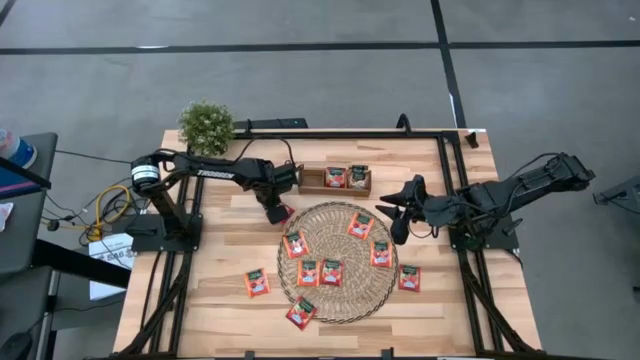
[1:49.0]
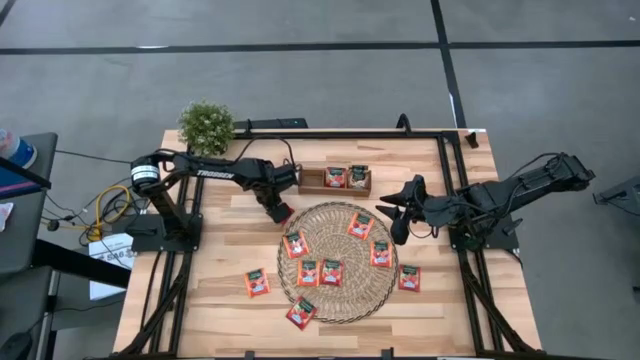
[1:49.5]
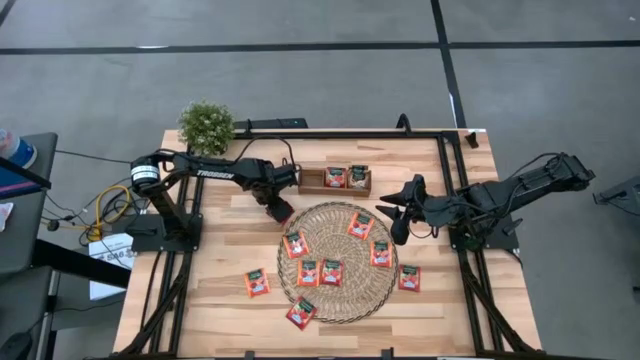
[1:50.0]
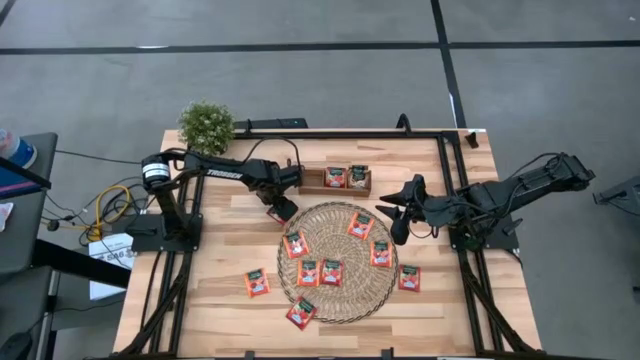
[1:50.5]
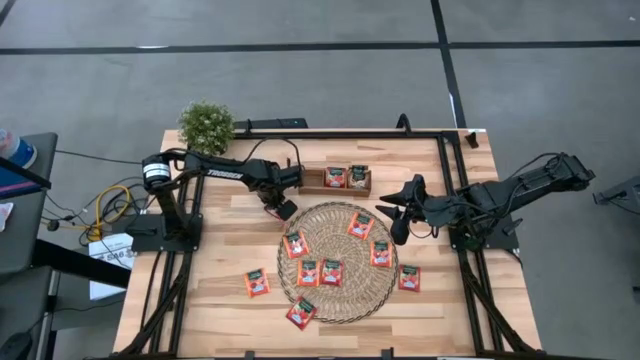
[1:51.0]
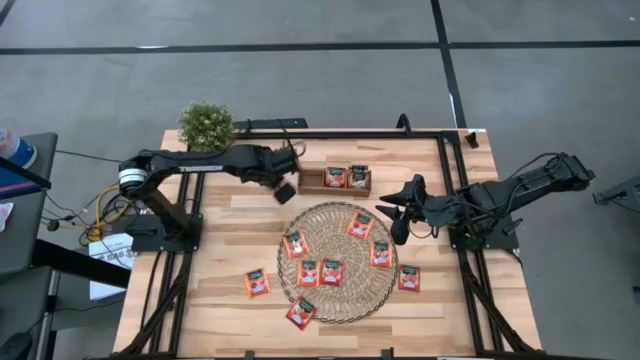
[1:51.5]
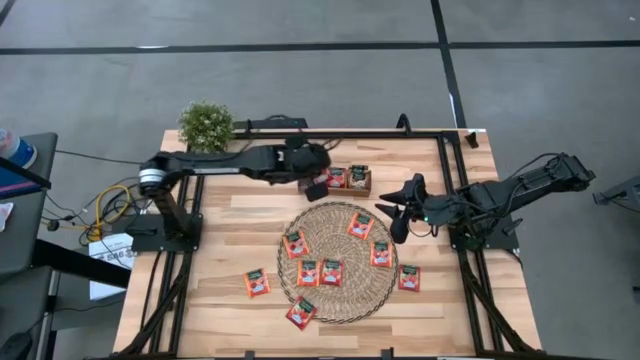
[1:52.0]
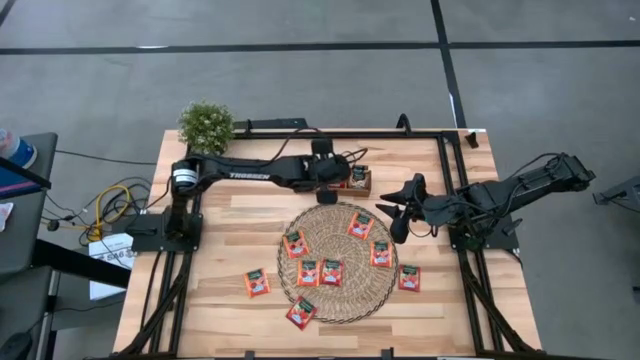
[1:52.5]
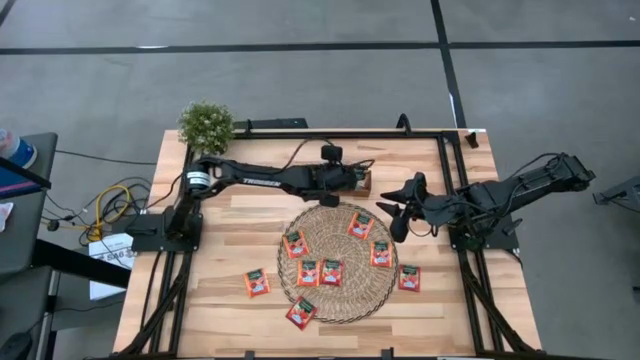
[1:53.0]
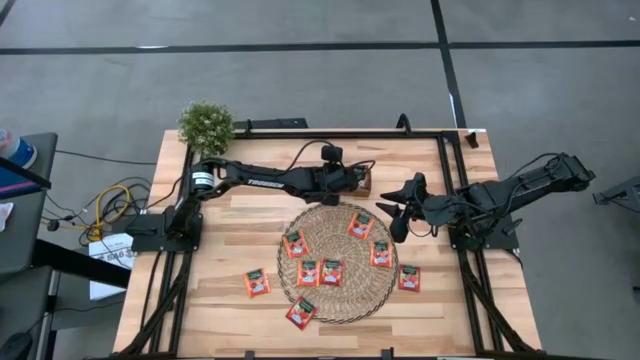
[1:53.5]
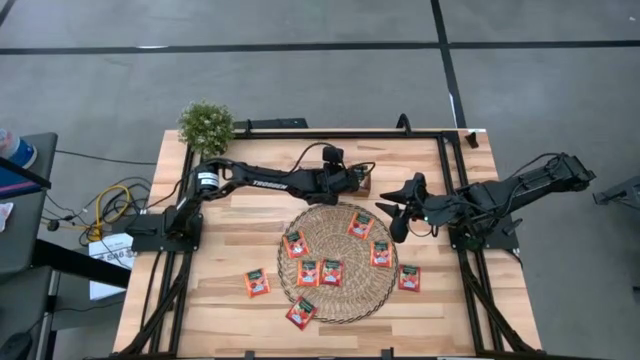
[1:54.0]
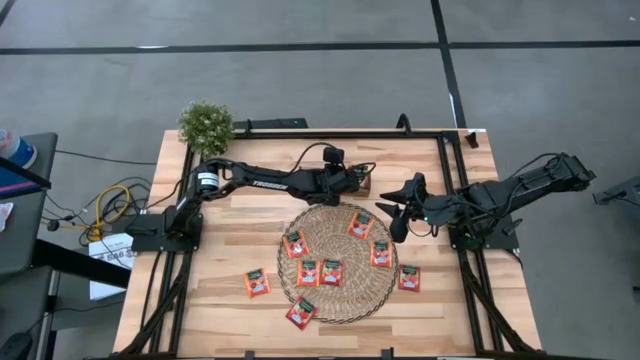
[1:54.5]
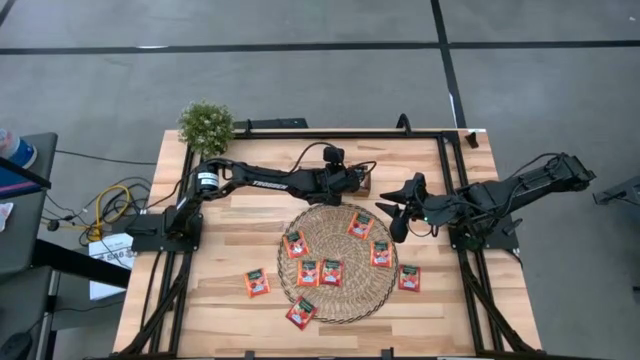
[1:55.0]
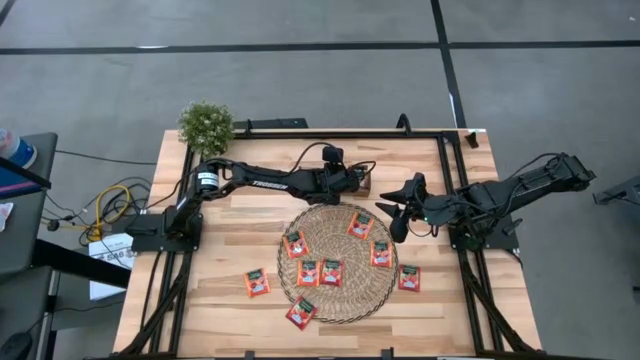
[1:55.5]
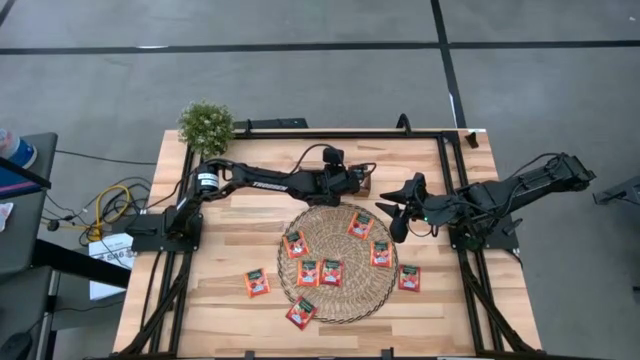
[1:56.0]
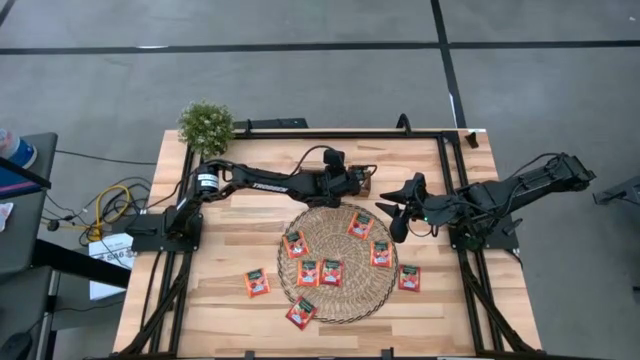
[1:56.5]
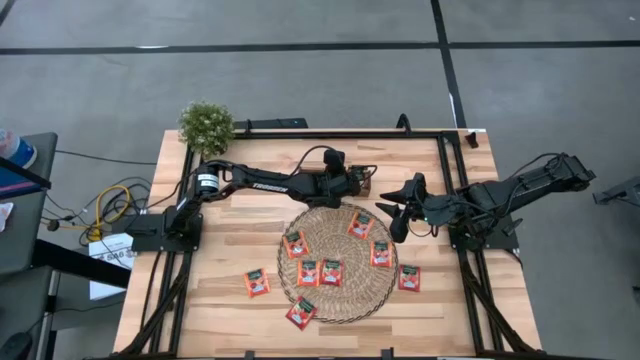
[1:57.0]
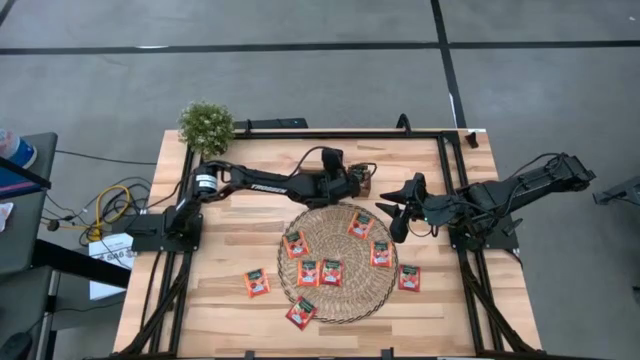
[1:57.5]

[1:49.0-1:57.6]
Task: Pick & Place Tea
Put the red tea bag into the middle section of the wooden organizer

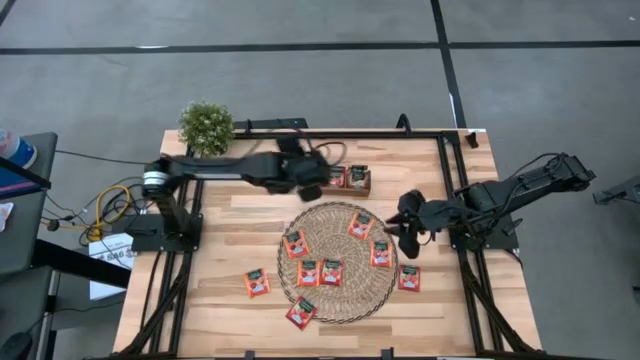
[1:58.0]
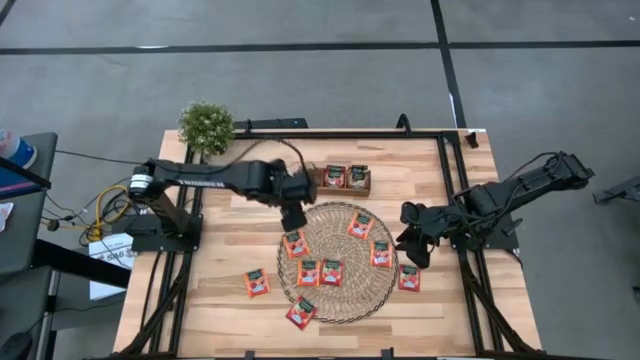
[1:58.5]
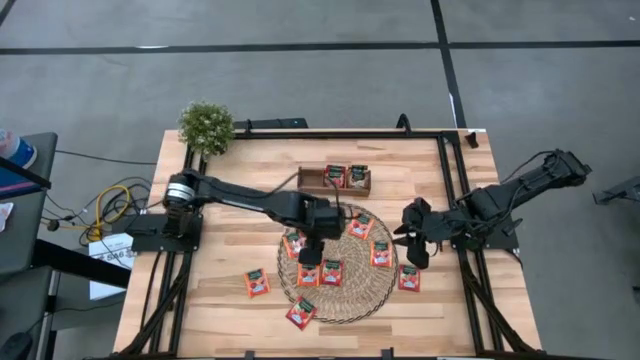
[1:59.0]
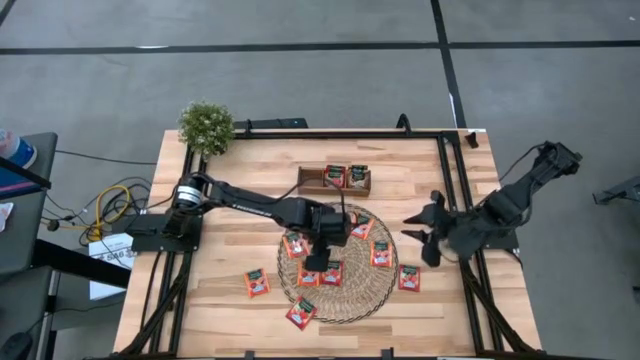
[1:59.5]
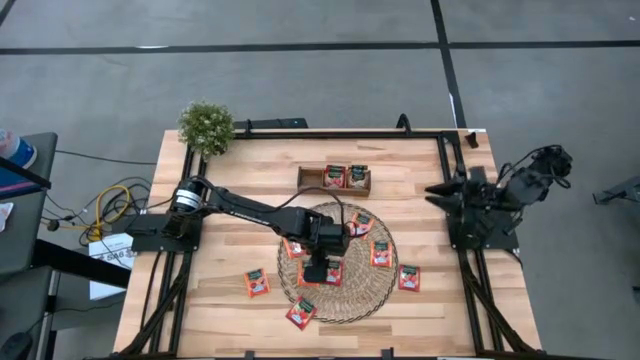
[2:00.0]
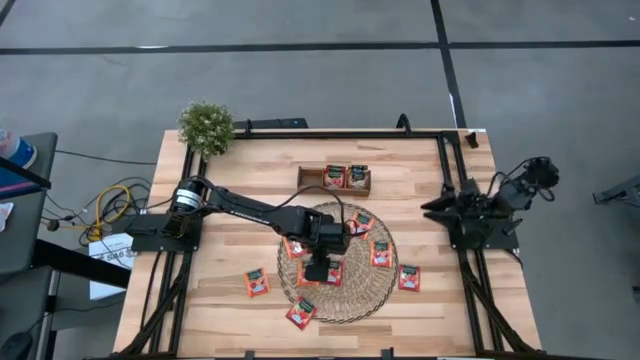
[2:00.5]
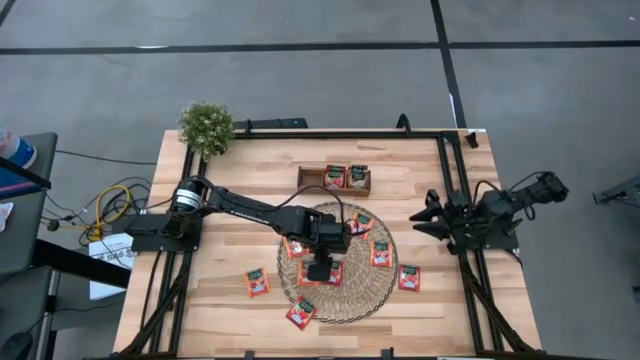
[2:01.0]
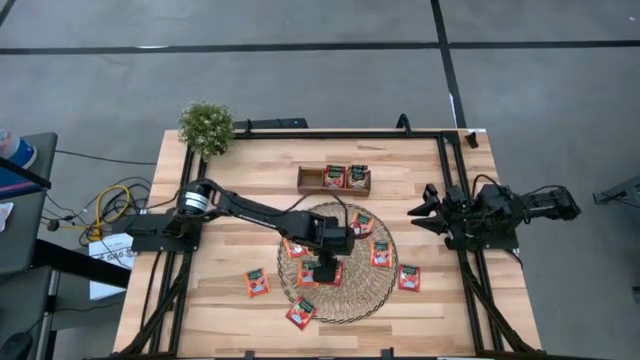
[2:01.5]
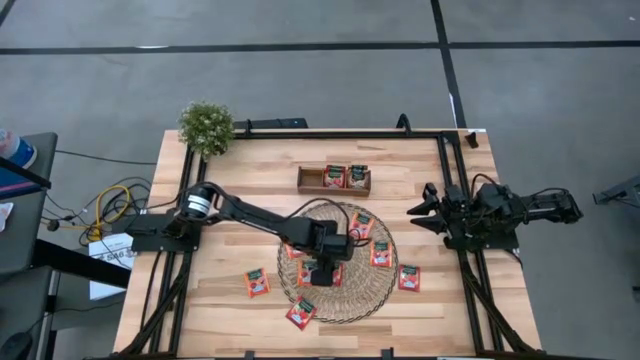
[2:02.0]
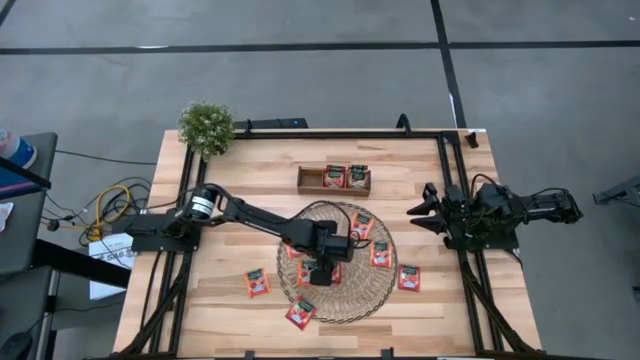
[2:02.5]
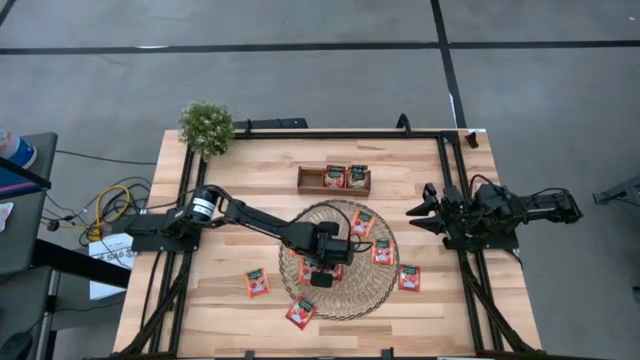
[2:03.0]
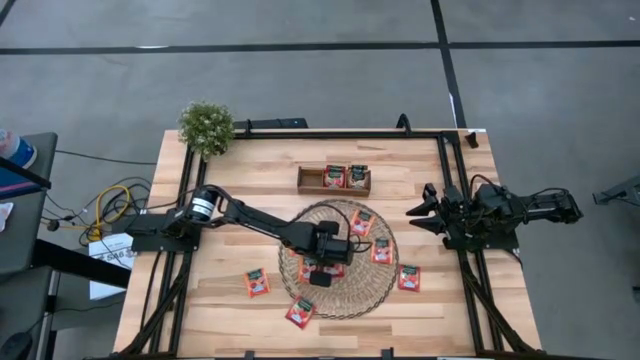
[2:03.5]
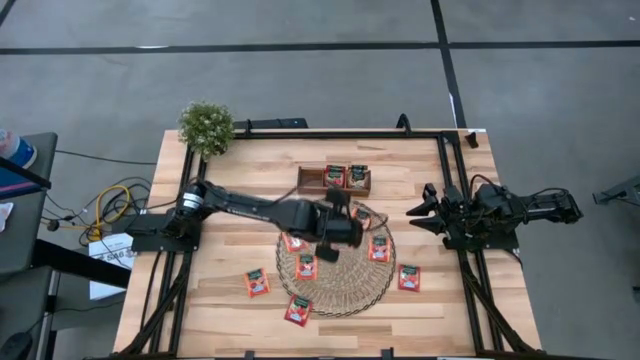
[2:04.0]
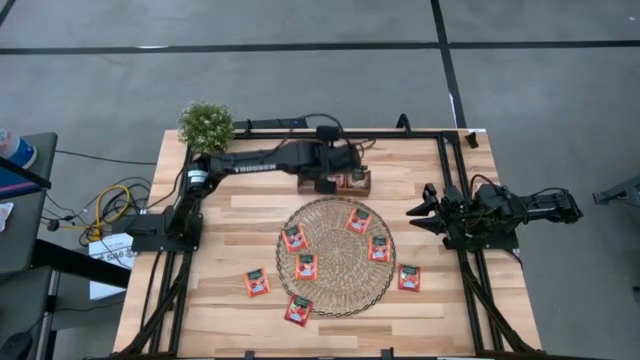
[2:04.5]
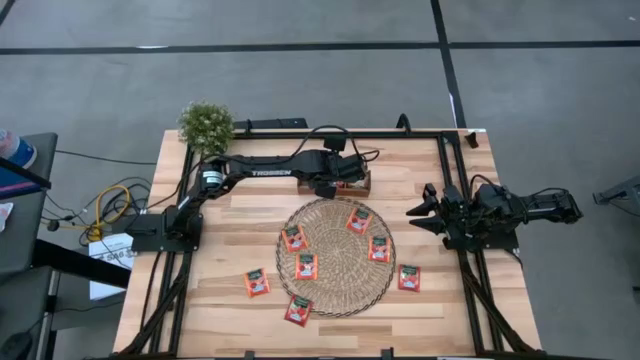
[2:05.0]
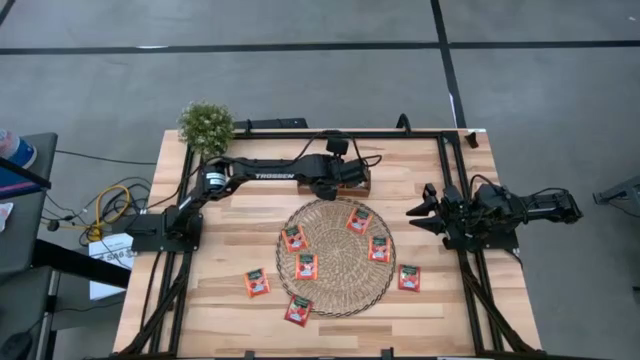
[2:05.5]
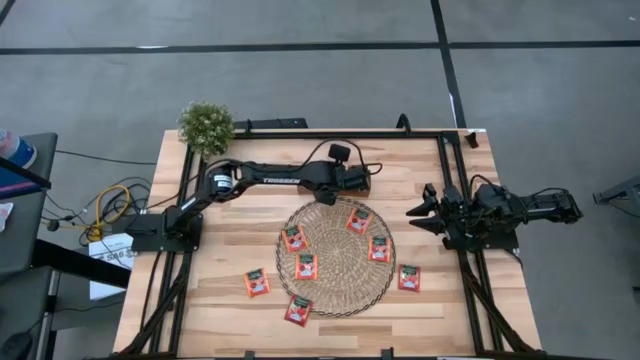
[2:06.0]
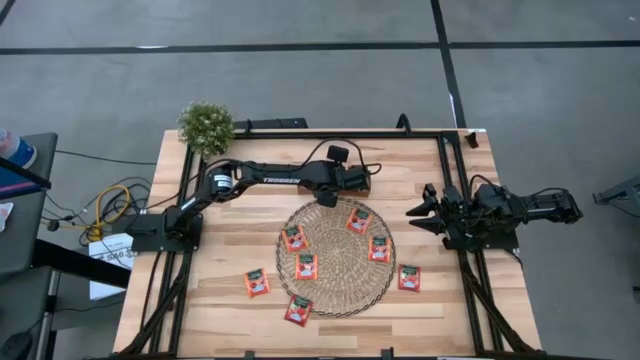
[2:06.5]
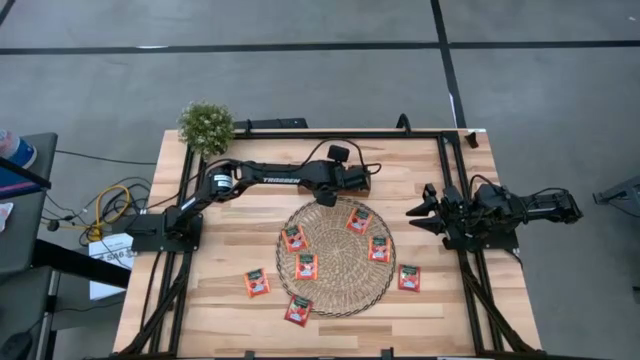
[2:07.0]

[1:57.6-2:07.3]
Put the red tea bag into the middle section of the wooden organizer

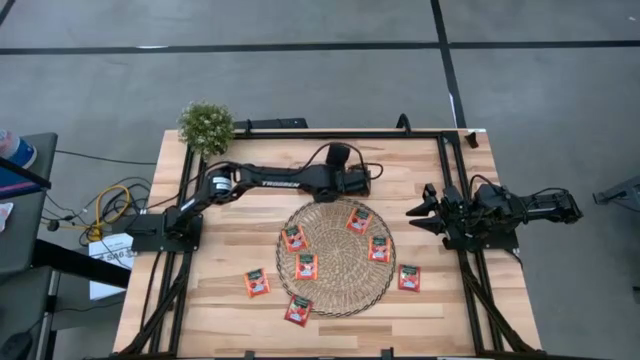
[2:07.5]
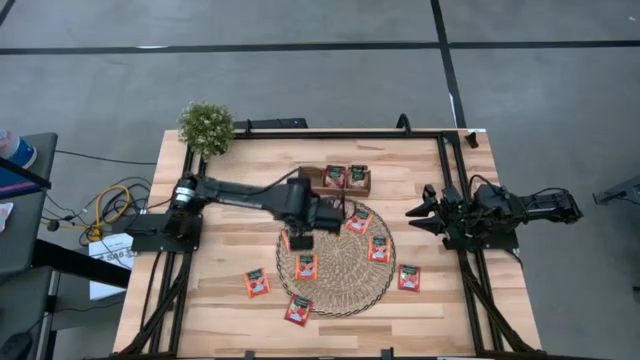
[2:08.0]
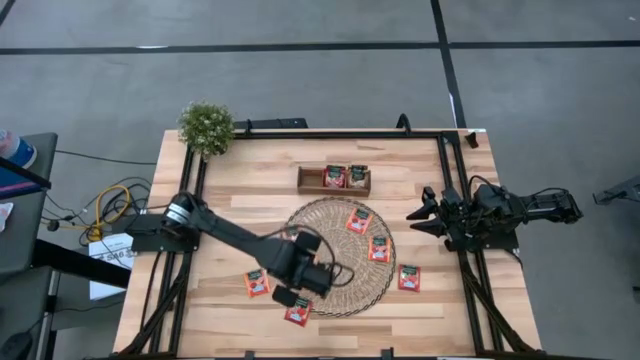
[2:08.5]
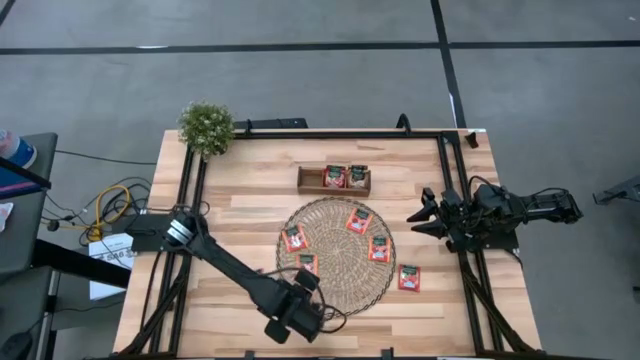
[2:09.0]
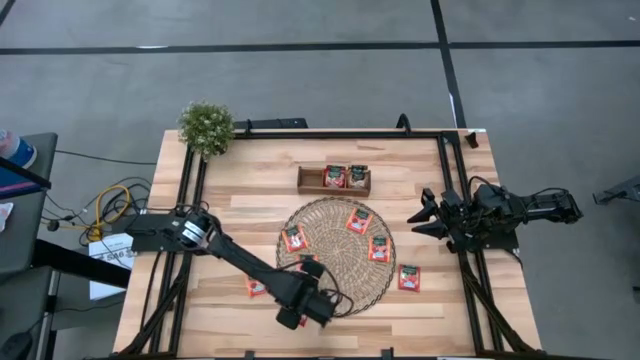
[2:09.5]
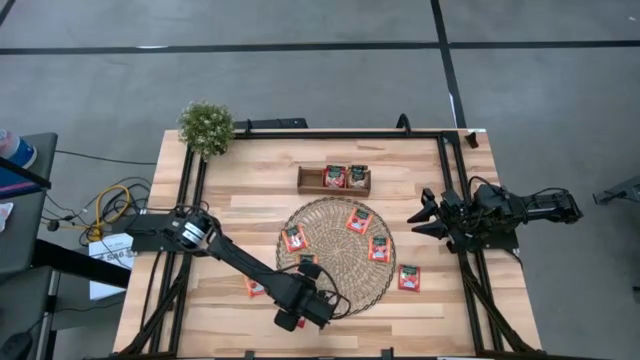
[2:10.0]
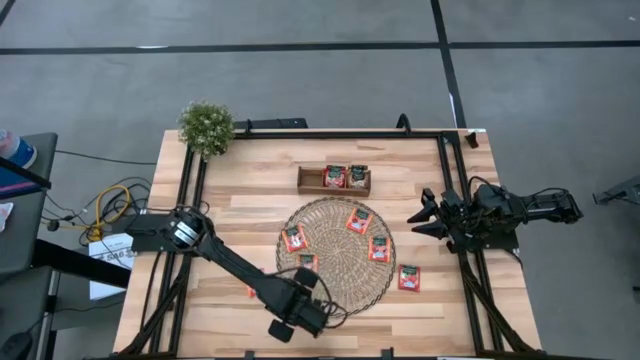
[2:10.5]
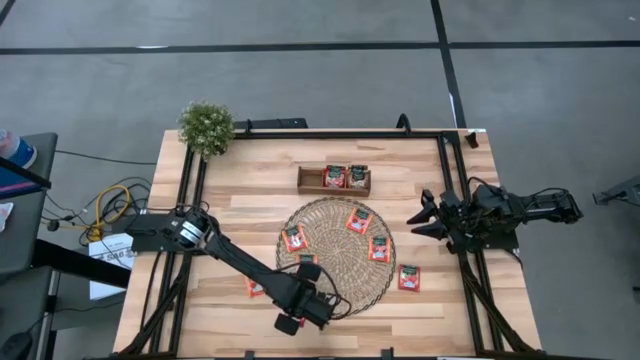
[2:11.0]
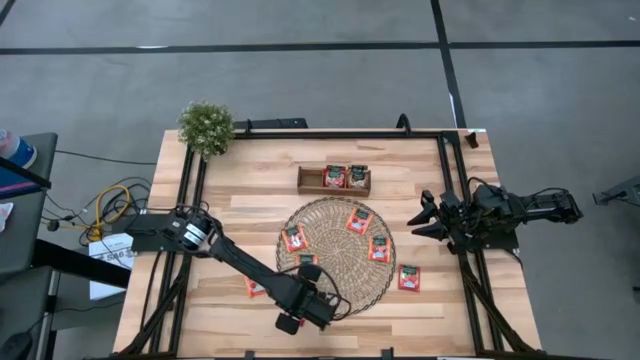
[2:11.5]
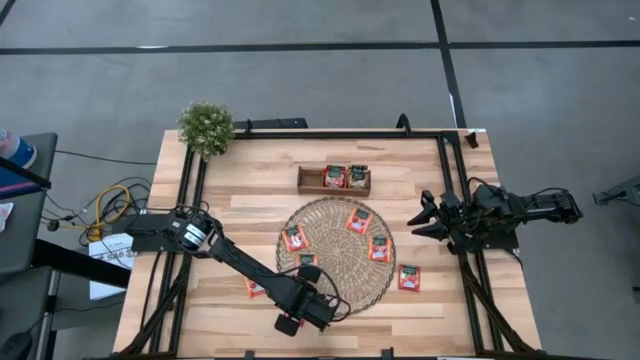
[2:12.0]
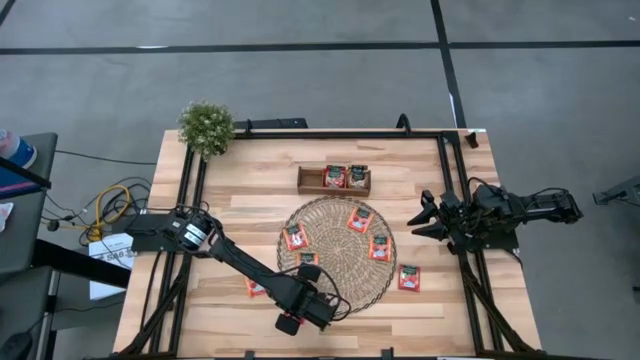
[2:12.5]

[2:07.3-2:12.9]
Put the red tea bag into the middle section of the wooden organizer
